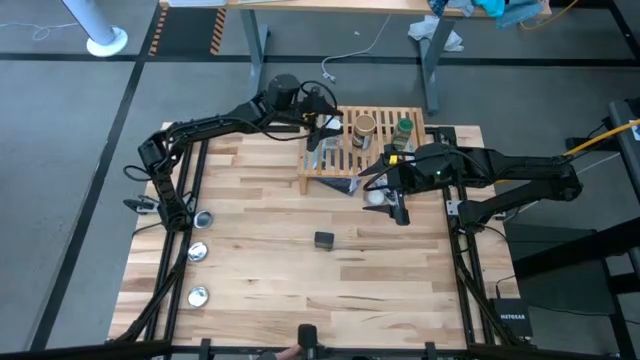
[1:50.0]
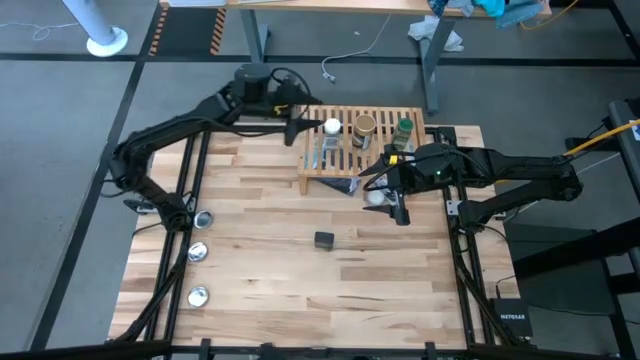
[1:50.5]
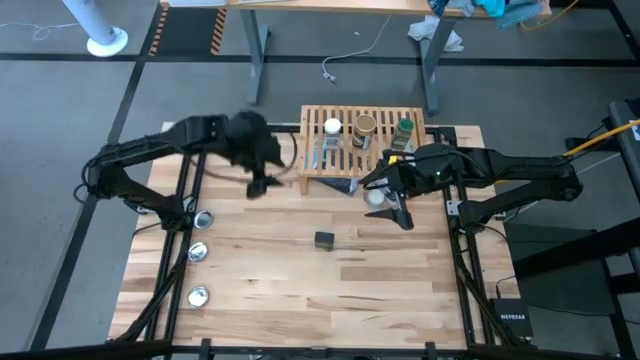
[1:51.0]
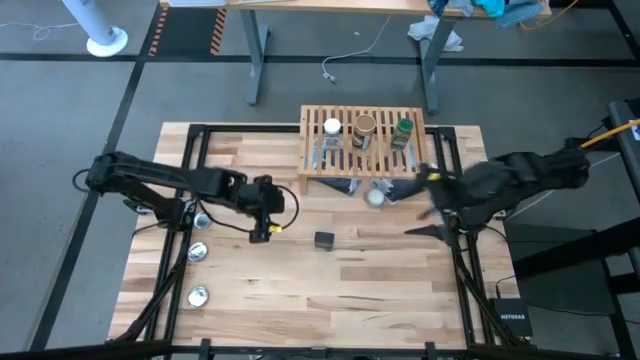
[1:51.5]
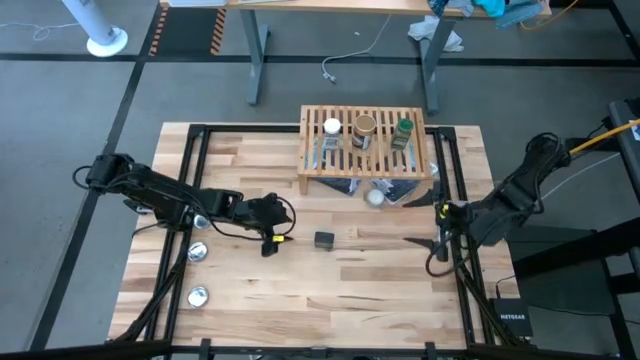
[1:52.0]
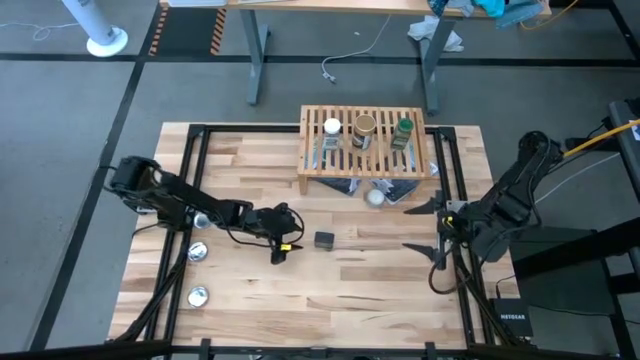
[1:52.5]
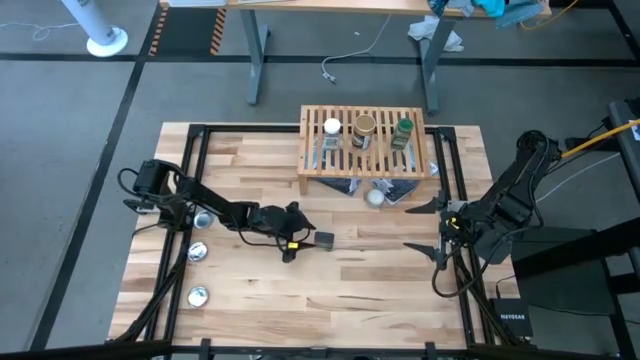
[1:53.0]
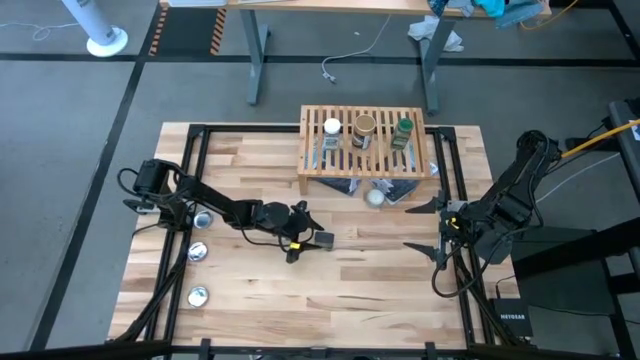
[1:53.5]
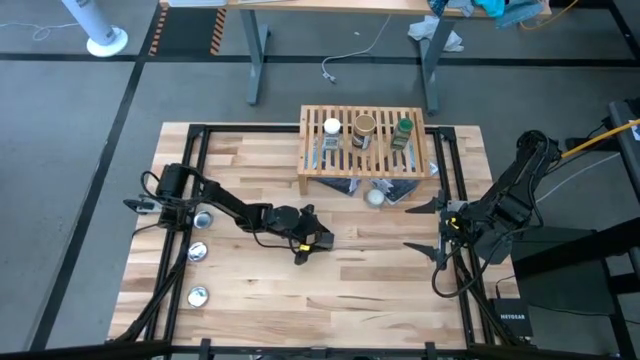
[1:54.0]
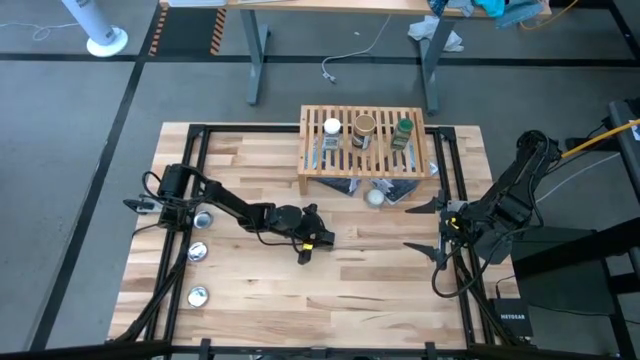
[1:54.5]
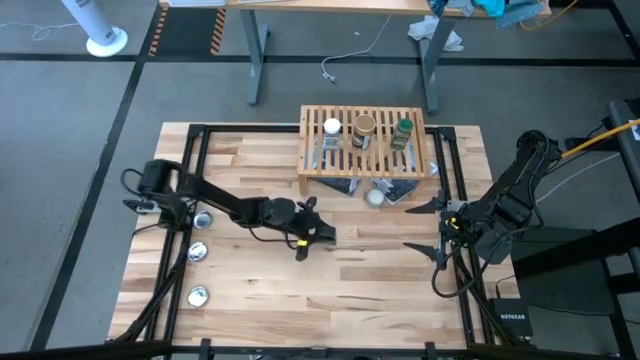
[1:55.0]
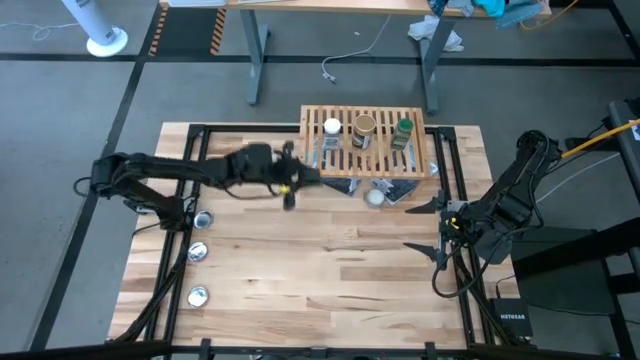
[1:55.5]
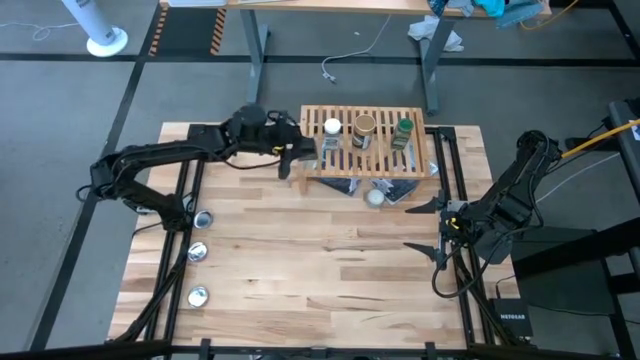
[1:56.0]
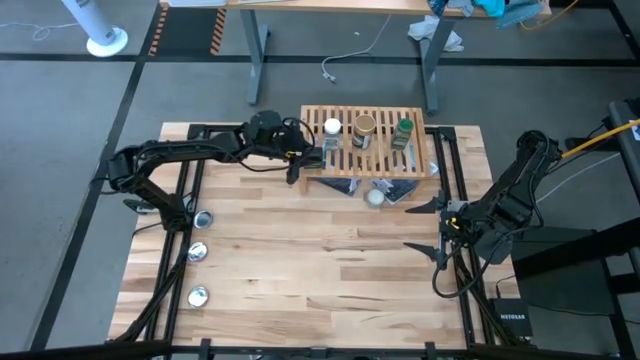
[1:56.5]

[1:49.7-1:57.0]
Task: Shelf spices
Put the black seasoning can on the shelf

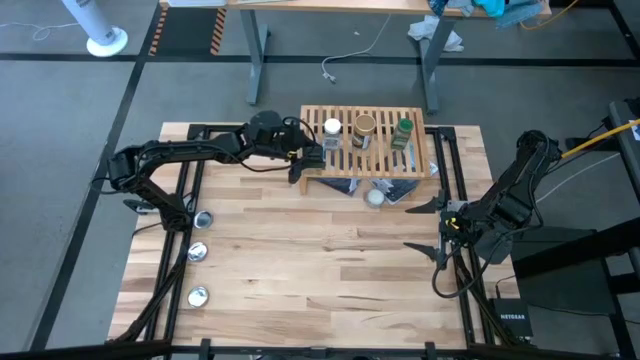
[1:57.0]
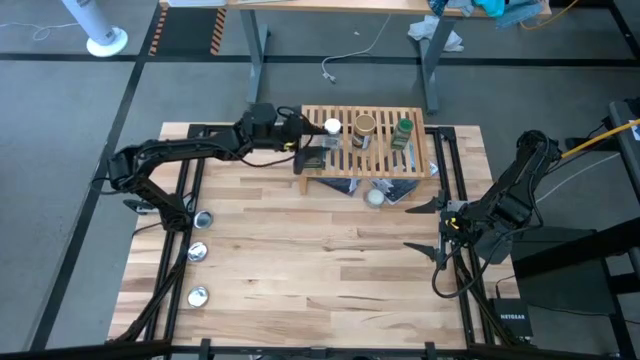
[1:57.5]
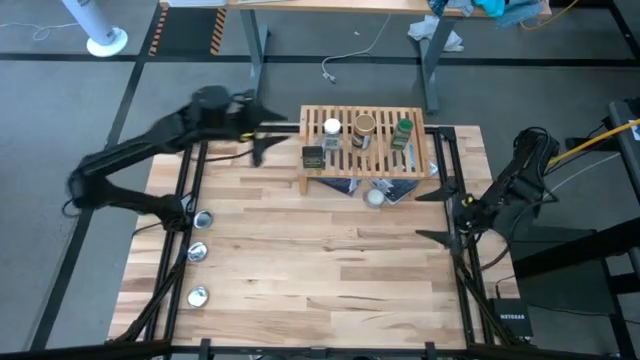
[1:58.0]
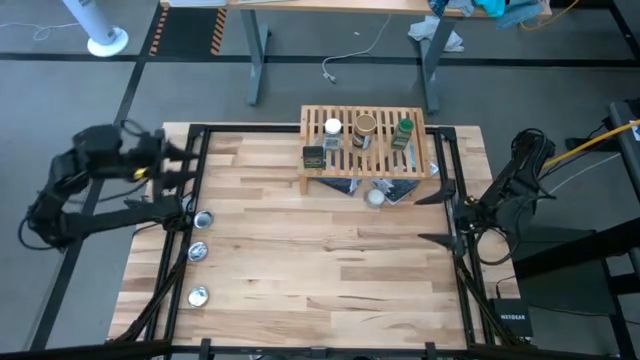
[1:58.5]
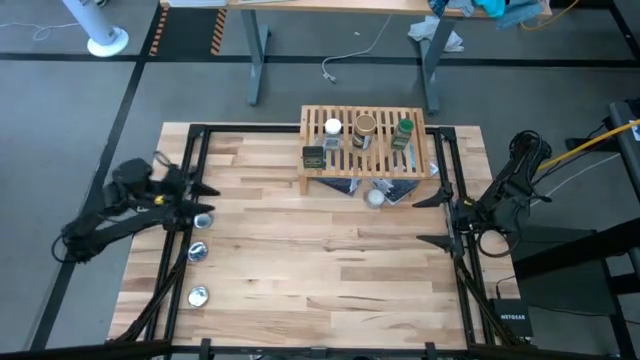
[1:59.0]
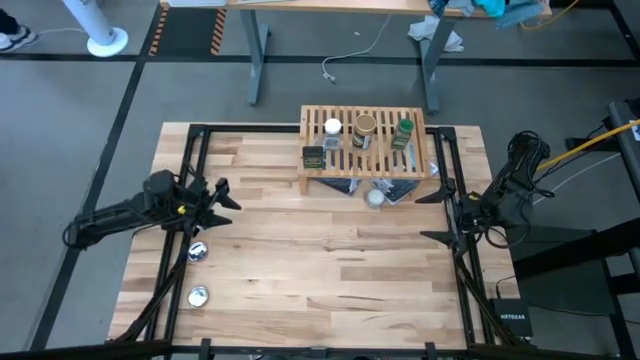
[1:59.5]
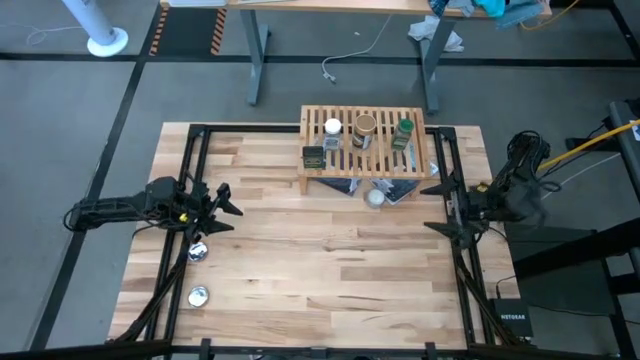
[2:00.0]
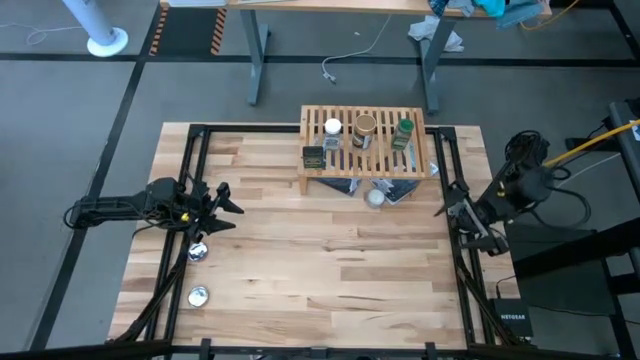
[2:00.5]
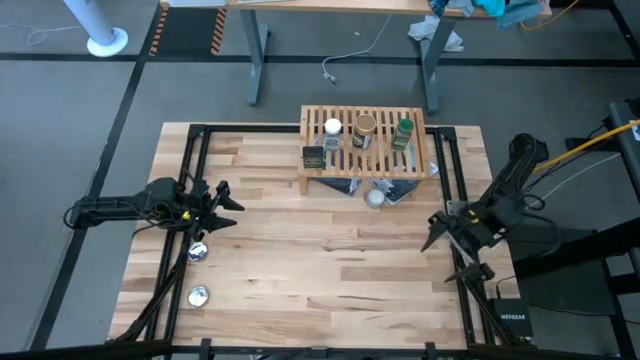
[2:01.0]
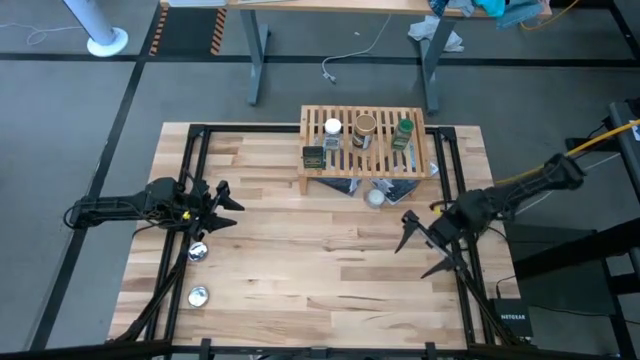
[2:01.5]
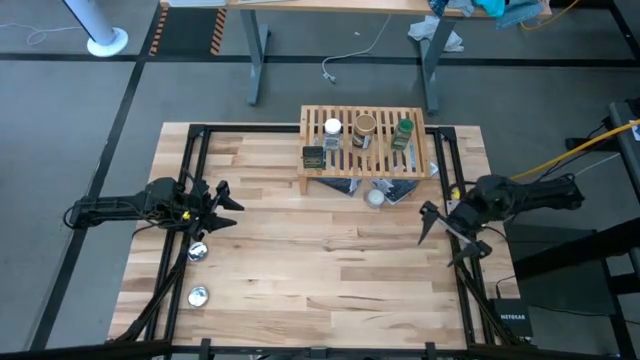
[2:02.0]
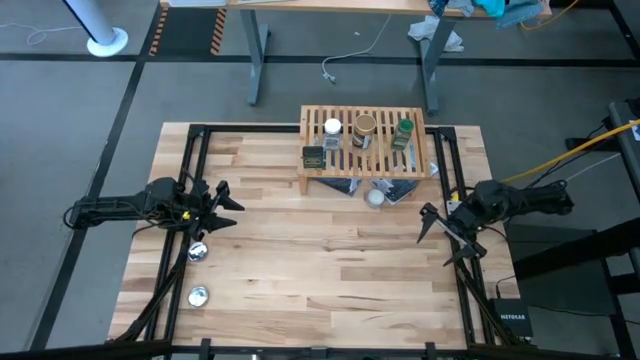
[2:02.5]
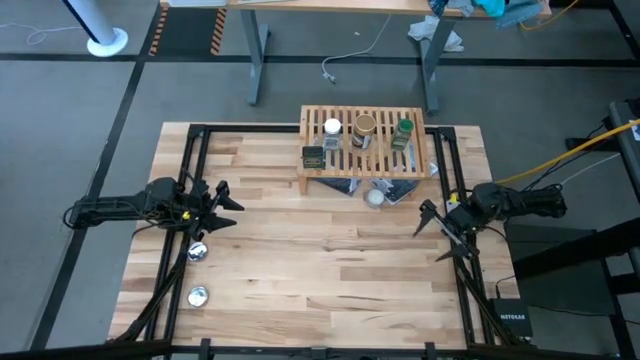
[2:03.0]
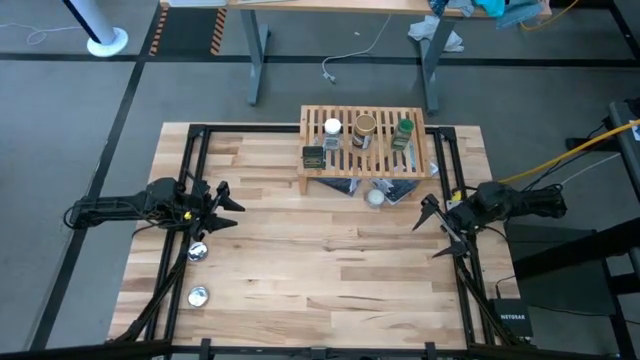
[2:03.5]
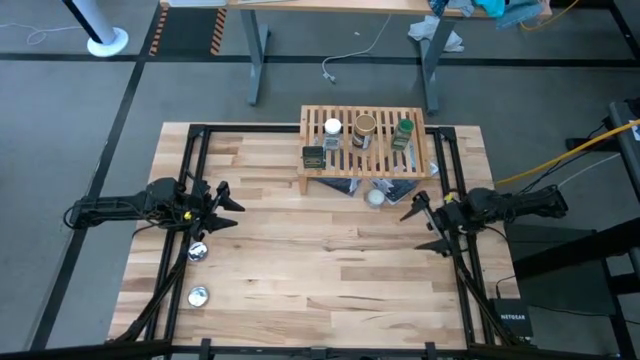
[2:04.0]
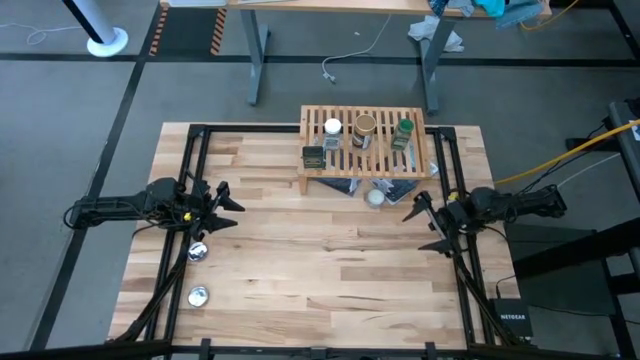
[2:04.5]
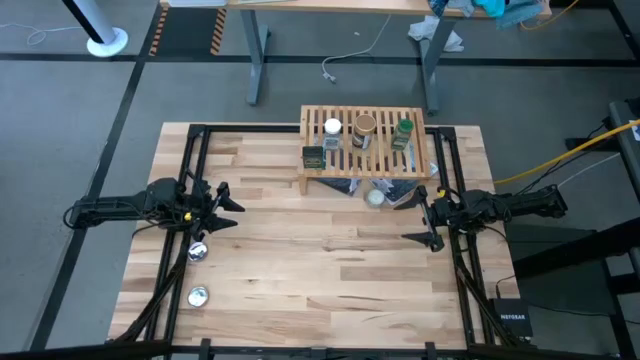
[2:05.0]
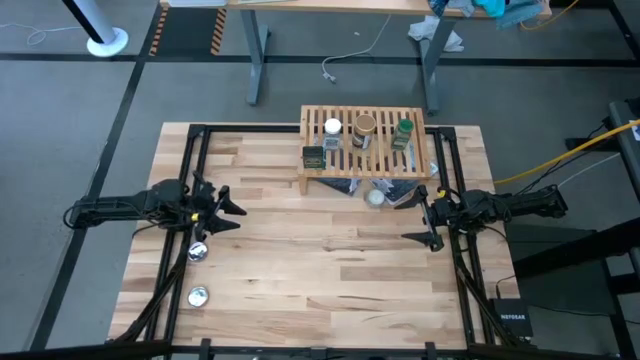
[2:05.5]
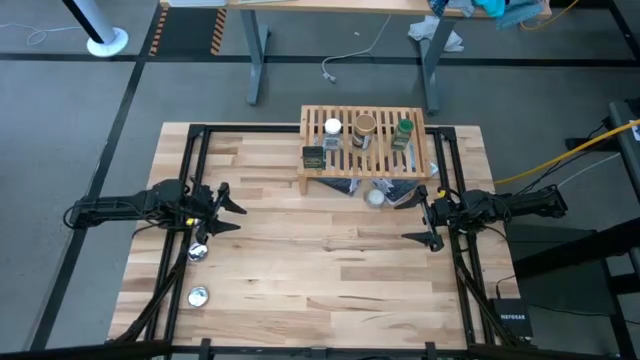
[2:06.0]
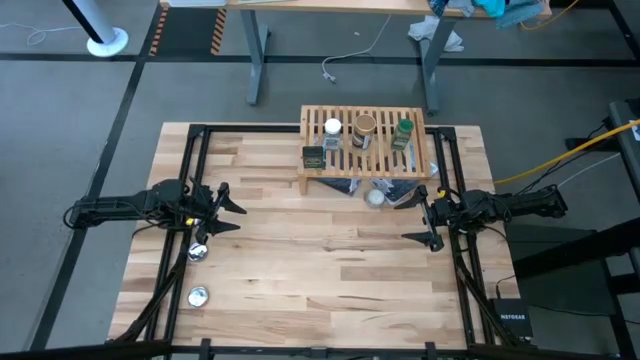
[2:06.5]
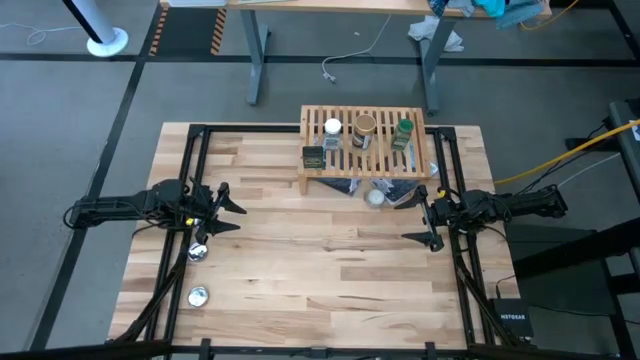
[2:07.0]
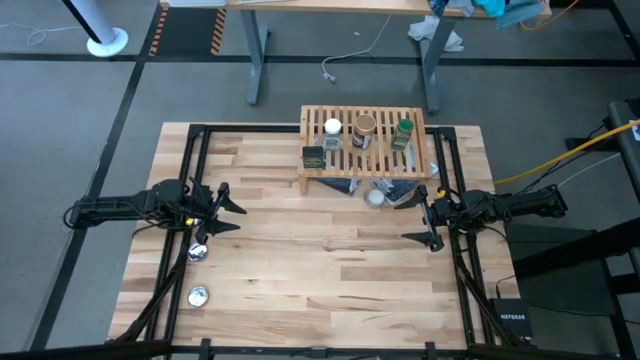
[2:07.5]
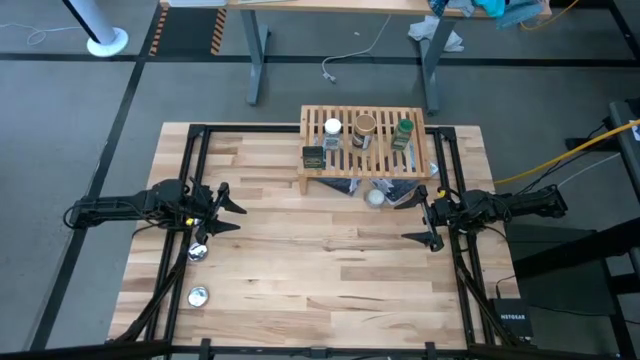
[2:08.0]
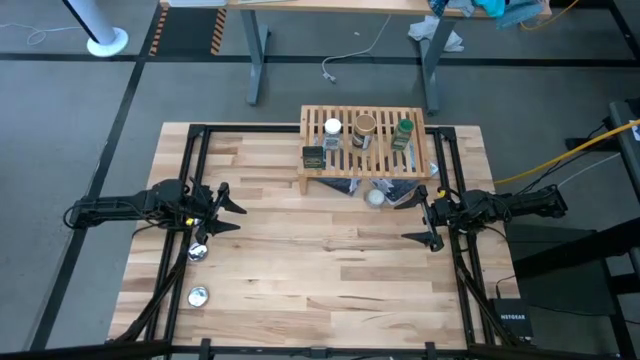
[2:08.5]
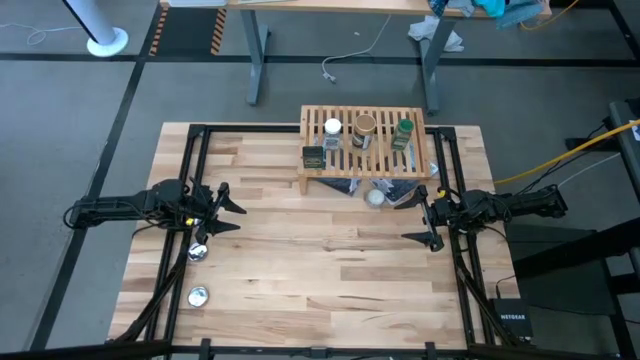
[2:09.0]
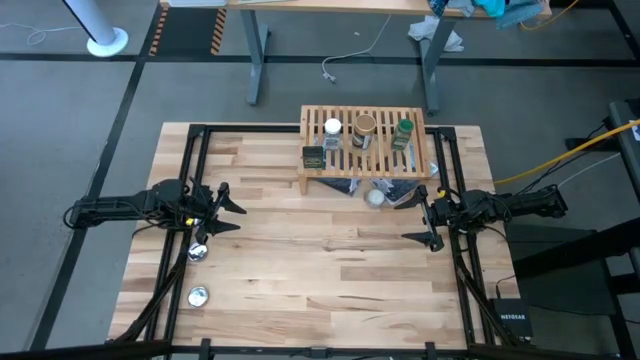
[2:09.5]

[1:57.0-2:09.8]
Return to Home Position
